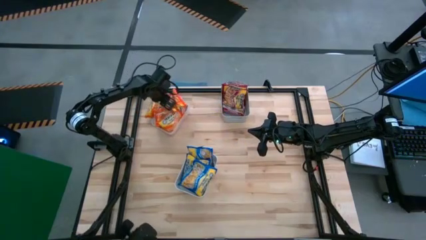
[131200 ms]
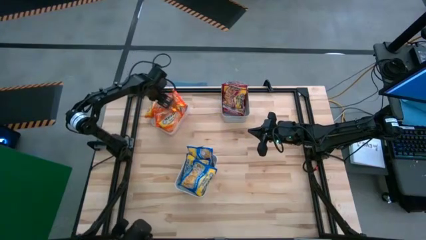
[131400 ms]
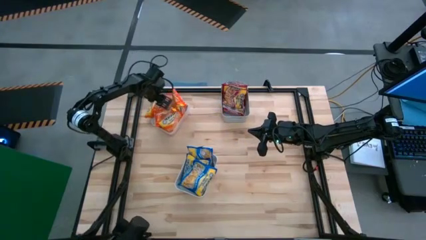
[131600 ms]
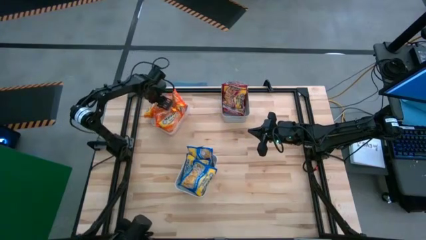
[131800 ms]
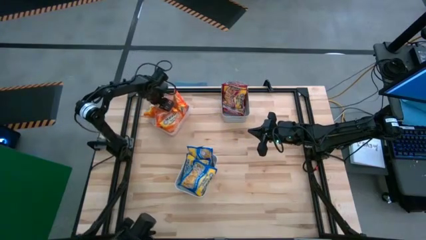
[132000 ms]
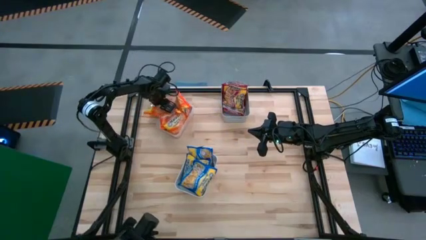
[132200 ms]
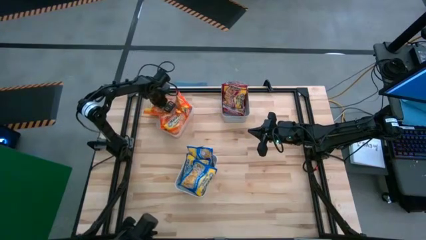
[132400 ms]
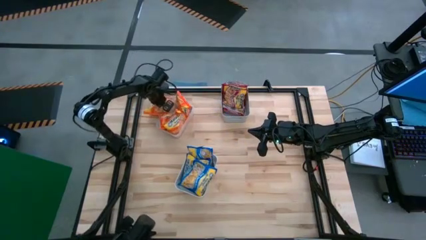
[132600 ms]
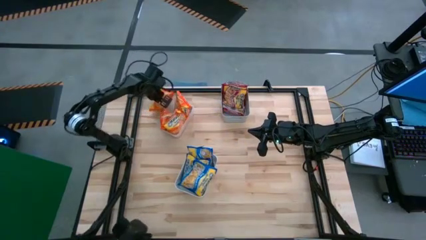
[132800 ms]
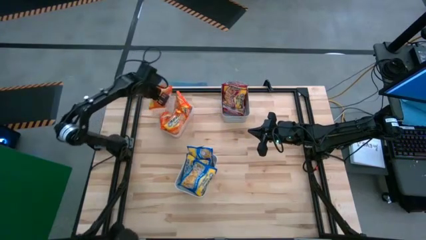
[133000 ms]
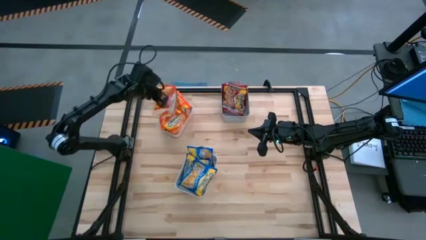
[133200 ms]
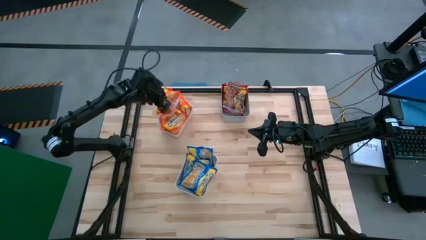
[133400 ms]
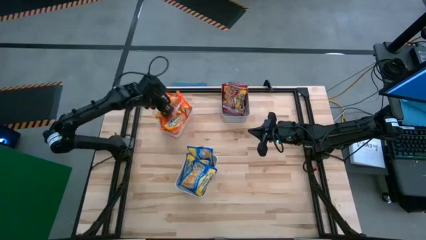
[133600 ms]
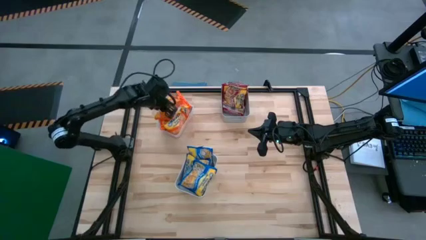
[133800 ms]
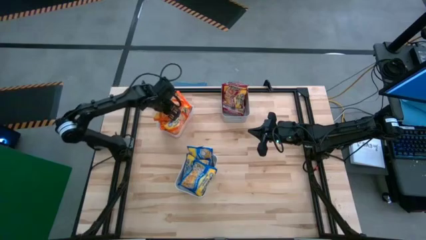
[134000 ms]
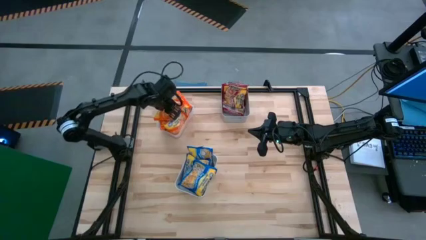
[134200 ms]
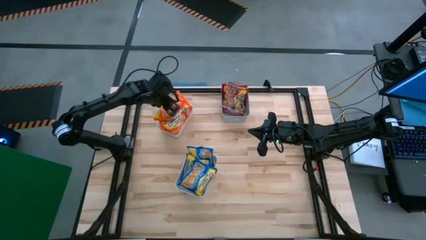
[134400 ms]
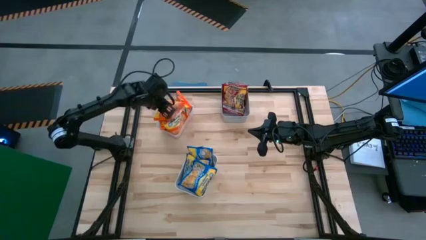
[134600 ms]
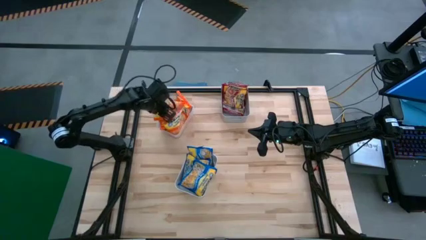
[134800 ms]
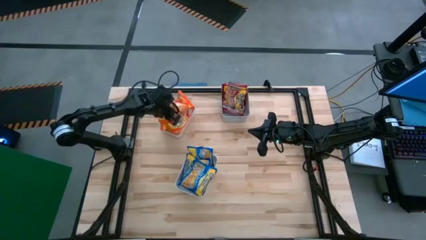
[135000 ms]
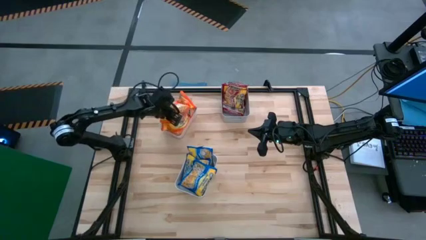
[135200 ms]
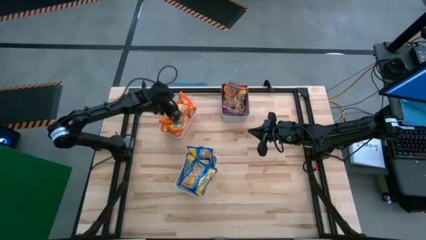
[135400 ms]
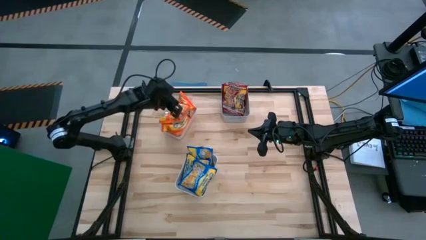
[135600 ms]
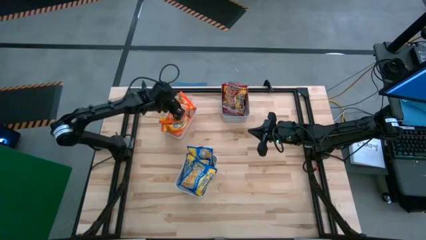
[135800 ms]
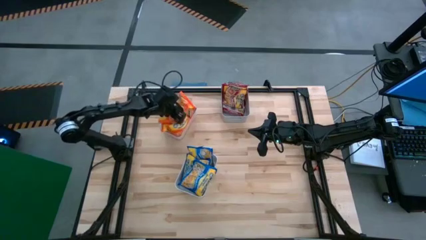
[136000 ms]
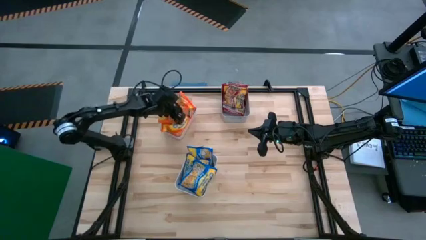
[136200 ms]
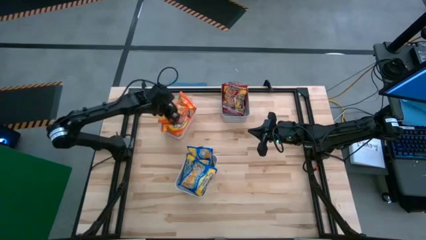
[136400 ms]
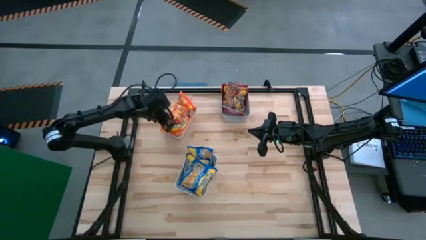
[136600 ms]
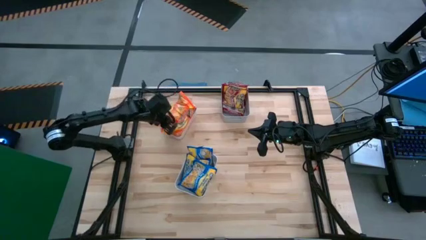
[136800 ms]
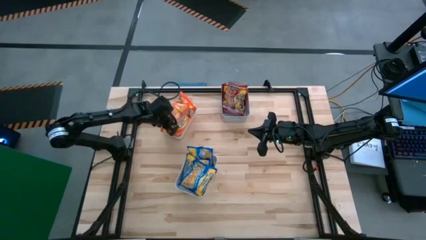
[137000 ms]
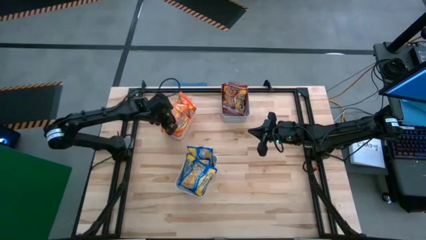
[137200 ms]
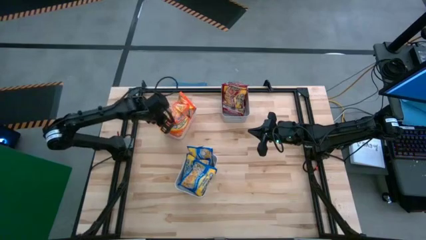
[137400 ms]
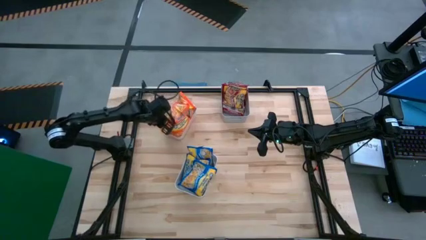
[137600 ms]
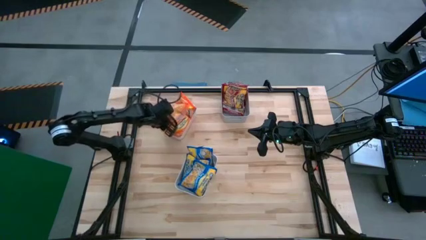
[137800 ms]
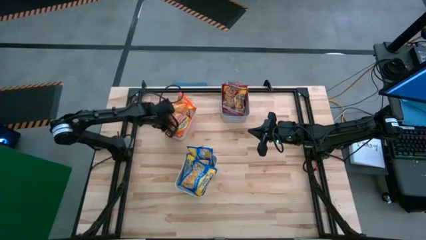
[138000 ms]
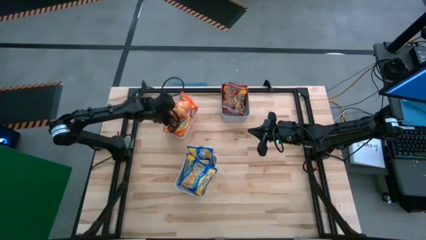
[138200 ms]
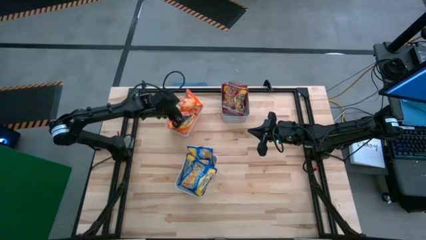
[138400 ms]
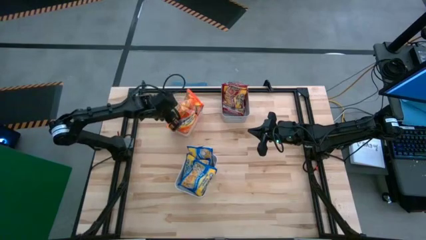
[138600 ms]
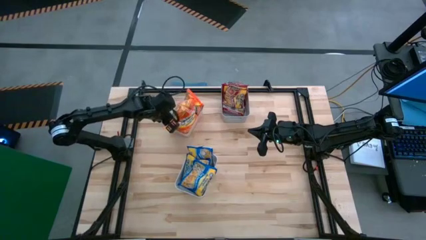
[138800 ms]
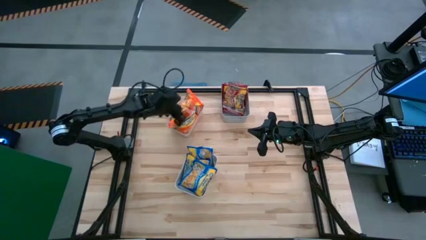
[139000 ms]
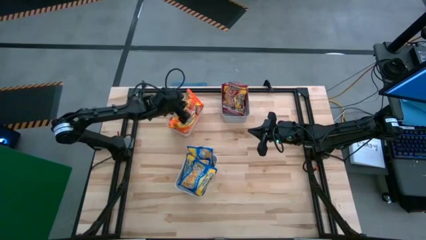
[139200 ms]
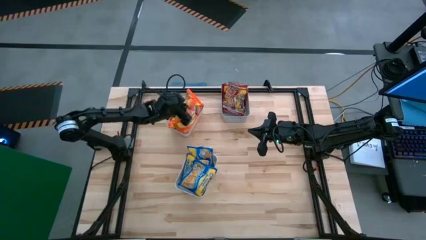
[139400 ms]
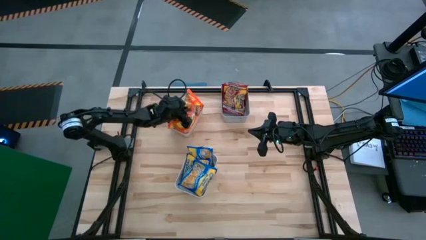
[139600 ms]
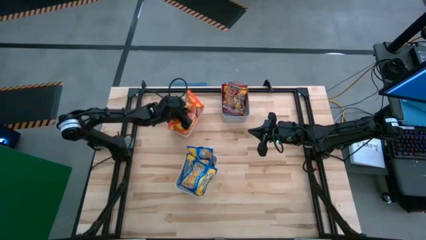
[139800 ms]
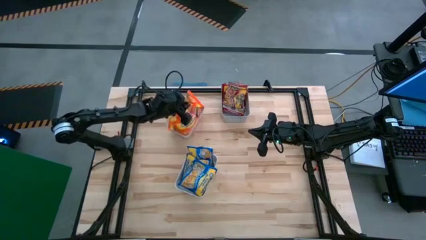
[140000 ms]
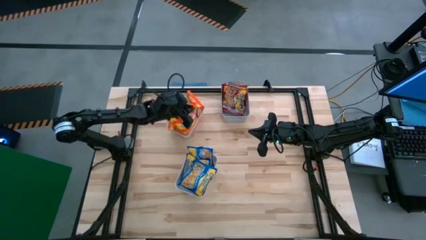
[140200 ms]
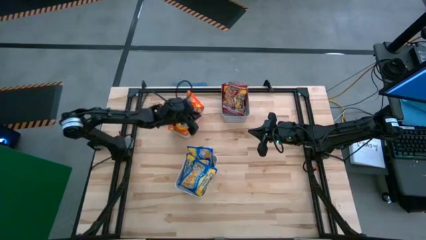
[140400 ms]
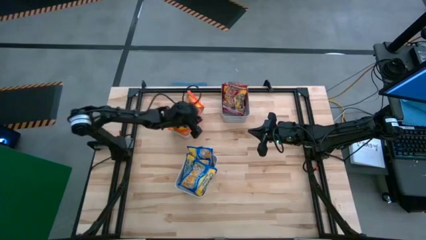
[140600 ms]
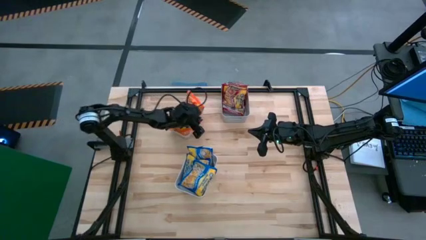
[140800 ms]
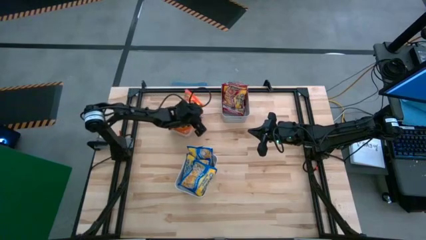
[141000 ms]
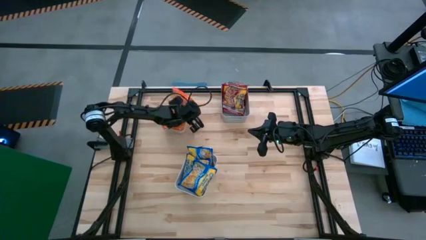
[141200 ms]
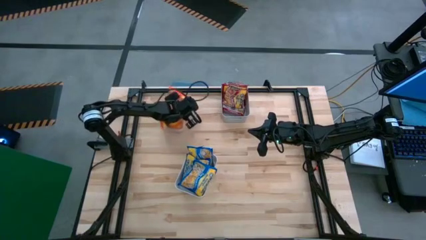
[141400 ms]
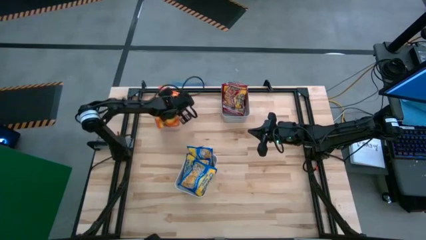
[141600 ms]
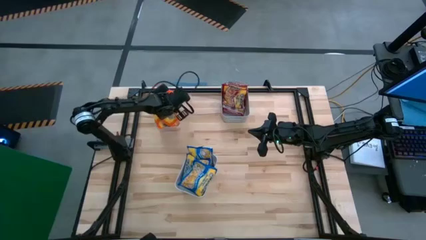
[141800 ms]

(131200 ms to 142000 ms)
Task: Sort Maruchan noodles
Put the orange noodle pack into the transparent bin

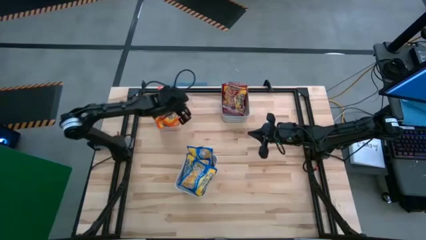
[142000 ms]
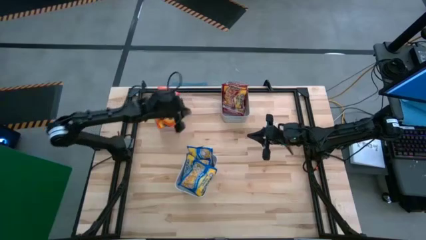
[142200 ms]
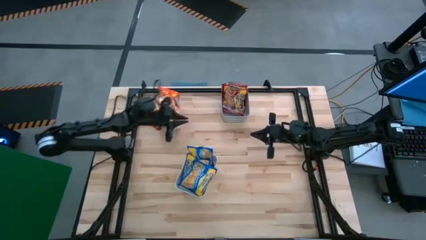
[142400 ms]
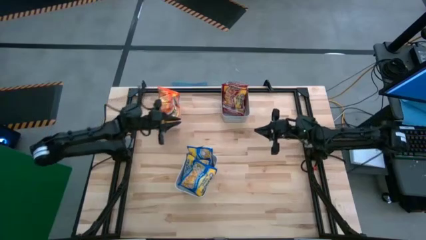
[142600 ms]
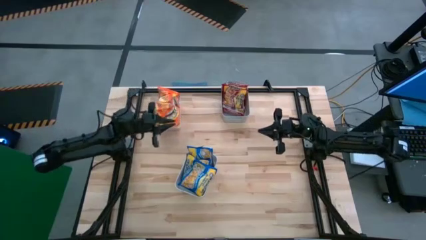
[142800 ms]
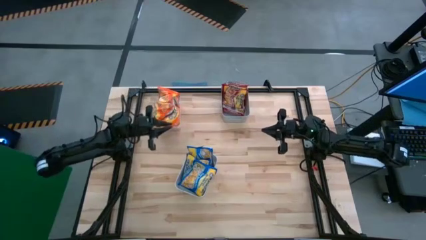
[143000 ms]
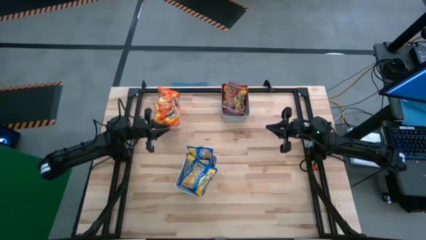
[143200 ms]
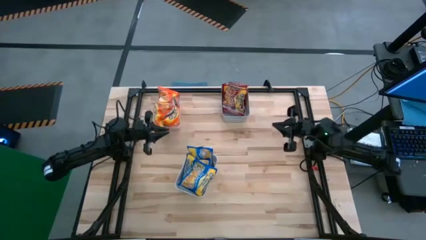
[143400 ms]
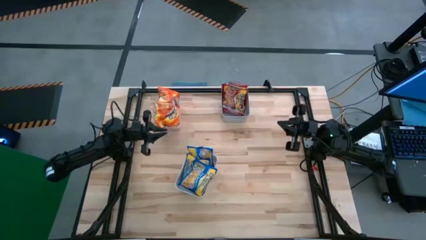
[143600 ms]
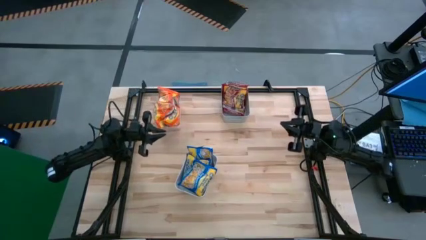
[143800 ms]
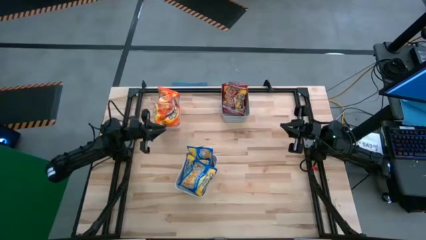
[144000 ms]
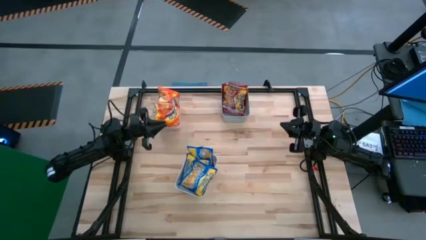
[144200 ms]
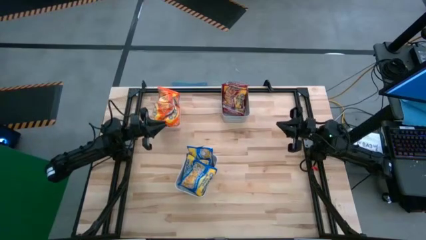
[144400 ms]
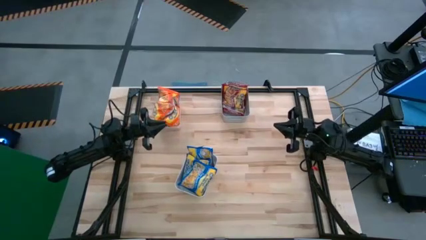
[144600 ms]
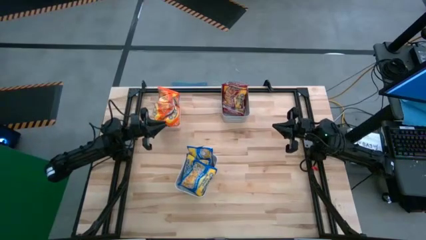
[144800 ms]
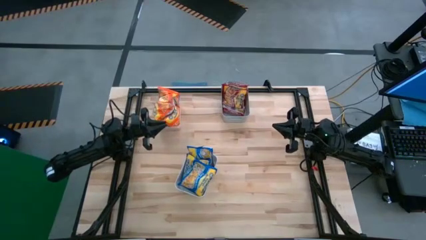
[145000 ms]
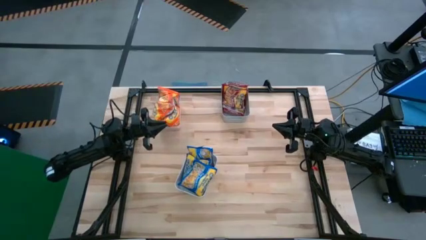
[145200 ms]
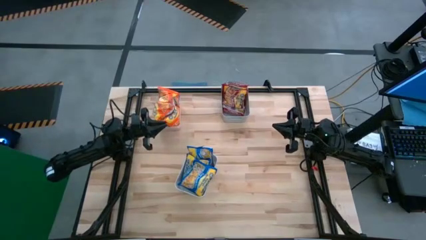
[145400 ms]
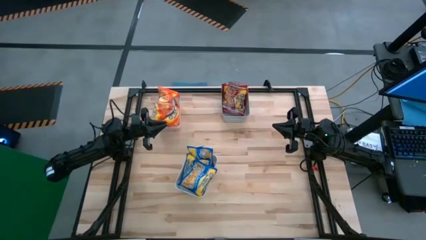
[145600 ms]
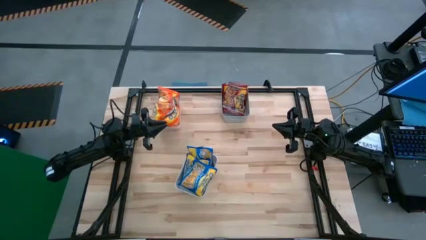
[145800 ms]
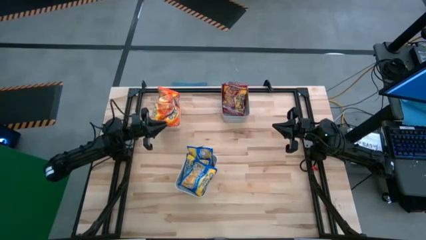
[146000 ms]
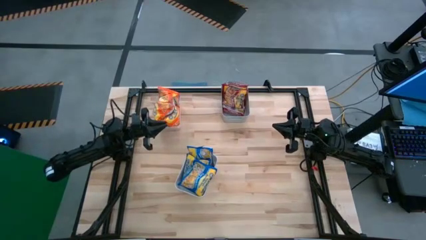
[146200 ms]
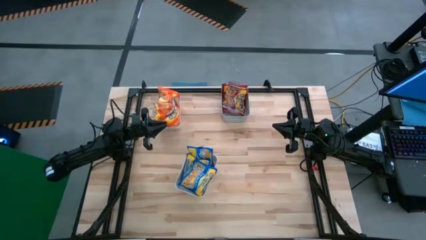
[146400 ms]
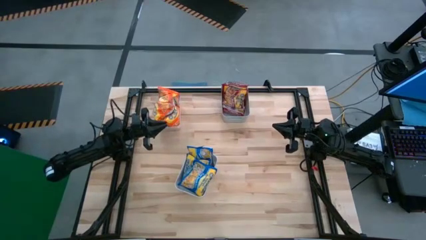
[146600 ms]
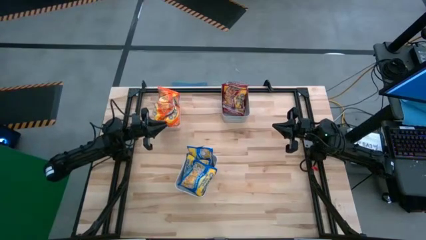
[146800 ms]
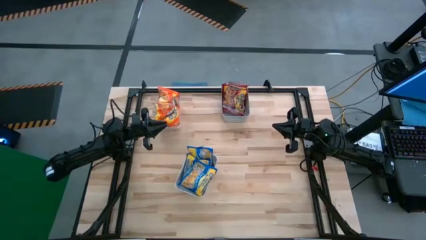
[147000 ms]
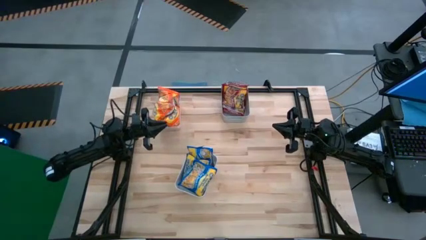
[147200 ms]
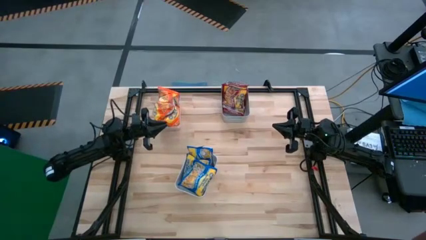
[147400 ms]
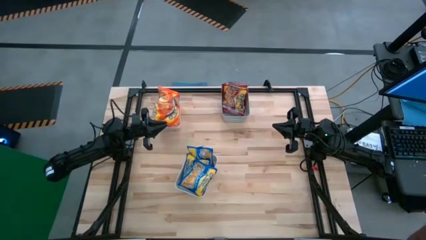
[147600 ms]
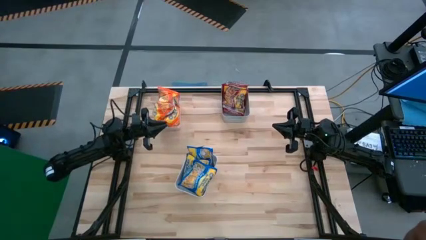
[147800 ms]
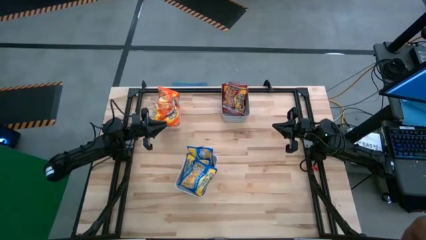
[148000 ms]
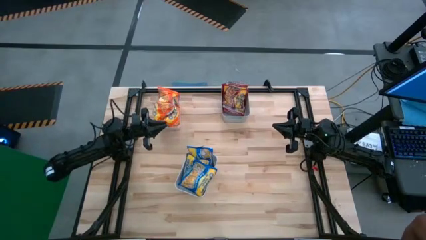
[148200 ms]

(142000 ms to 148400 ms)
Return to Home Position
